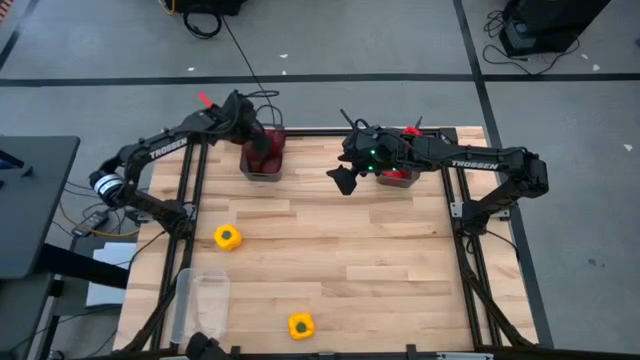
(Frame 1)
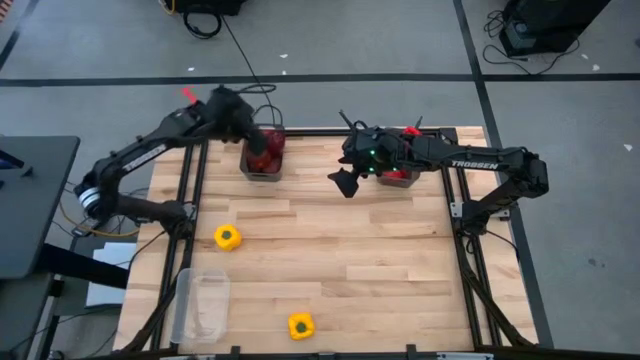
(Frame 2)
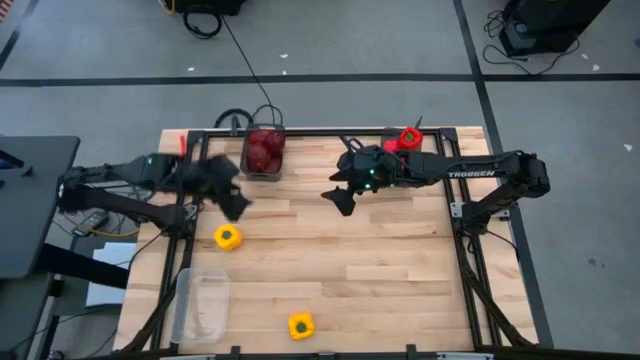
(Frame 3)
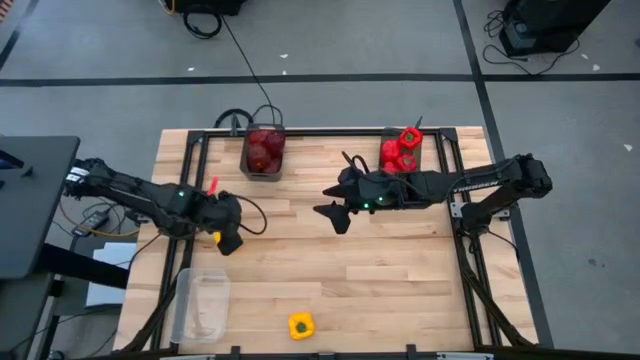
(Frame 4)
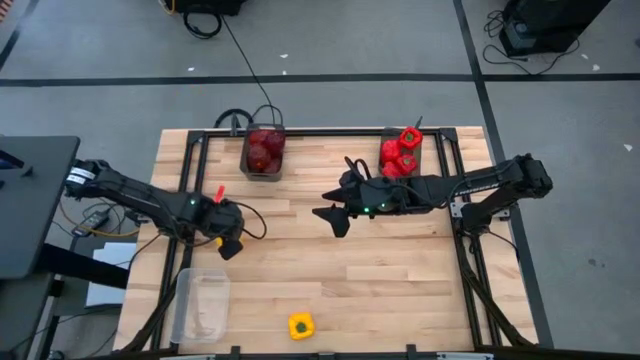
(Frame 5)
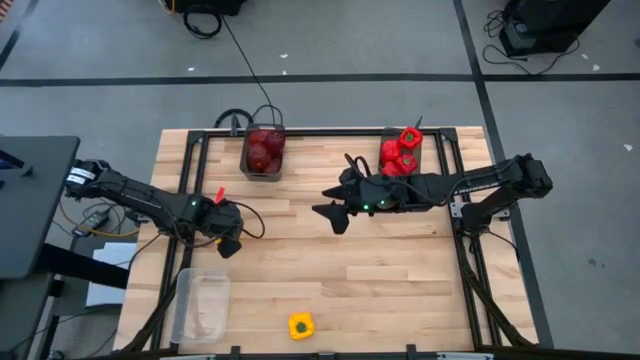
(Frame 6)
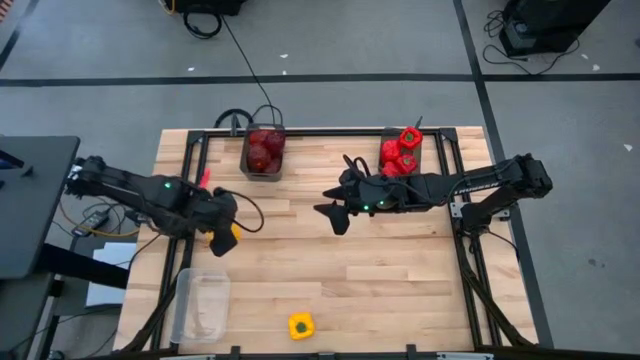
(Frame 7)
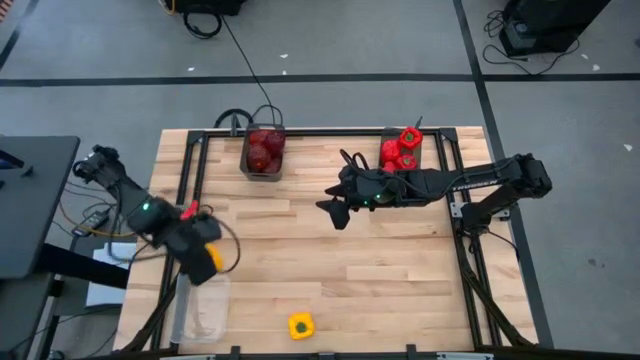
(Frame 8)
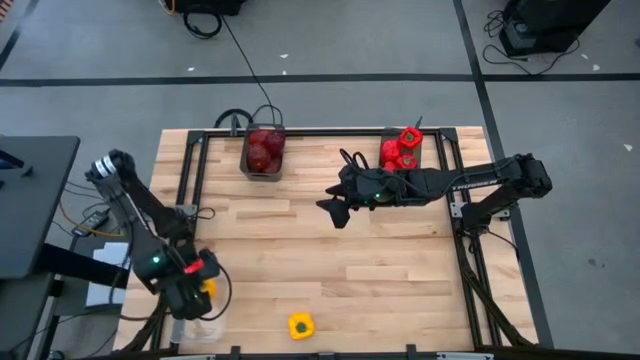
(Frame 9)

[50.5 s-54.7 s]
Task: Sort produce into baskets
Put the middle left yellow bell pepper into the transparent bin

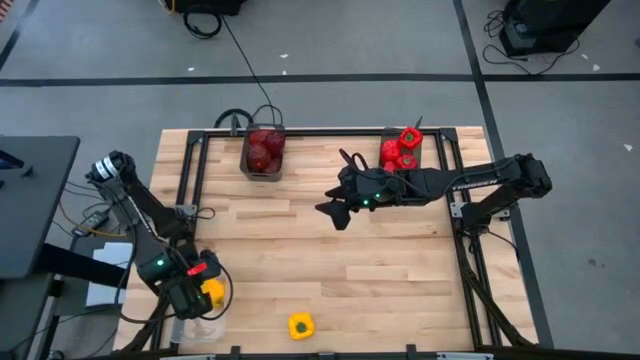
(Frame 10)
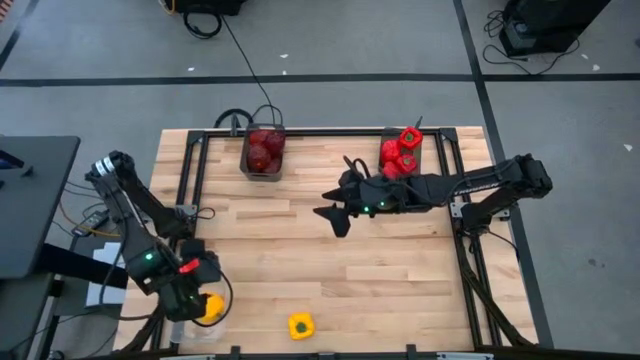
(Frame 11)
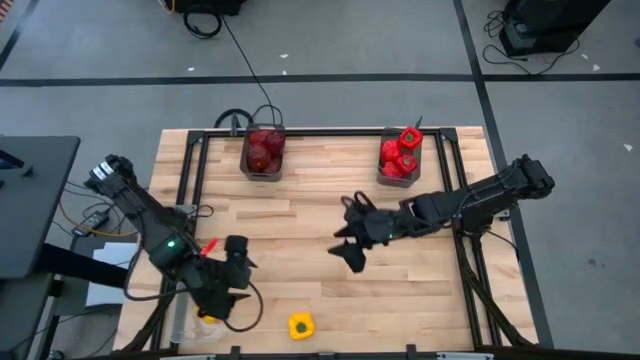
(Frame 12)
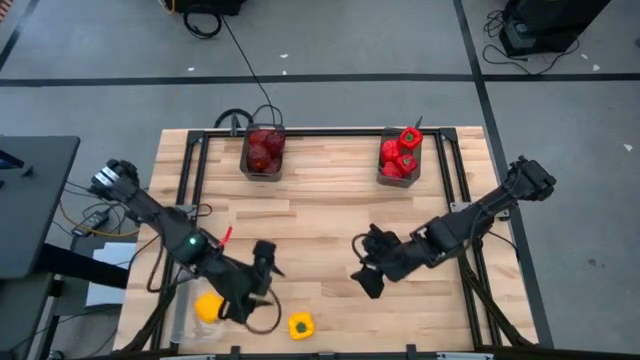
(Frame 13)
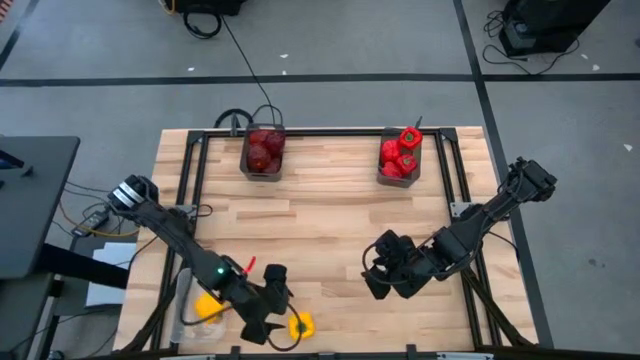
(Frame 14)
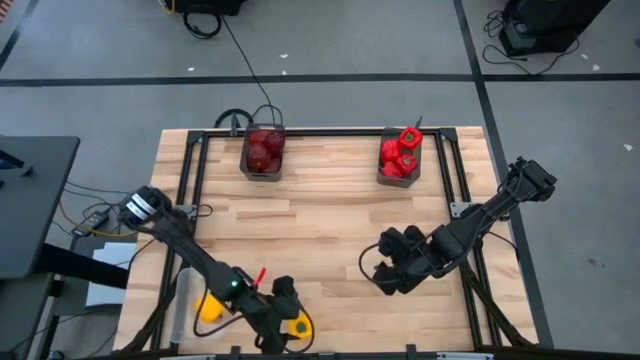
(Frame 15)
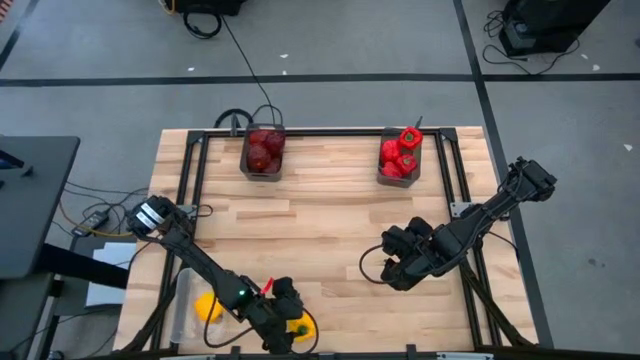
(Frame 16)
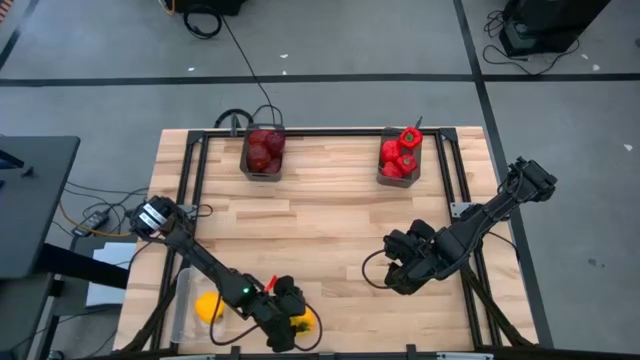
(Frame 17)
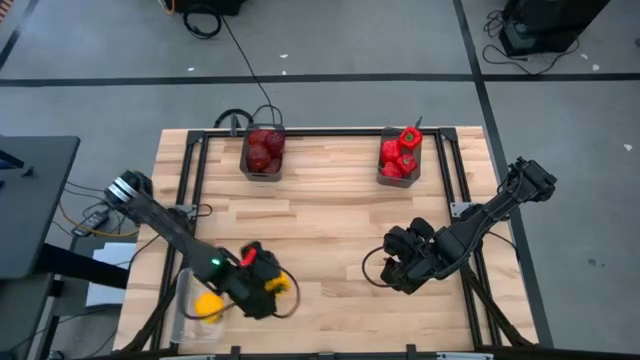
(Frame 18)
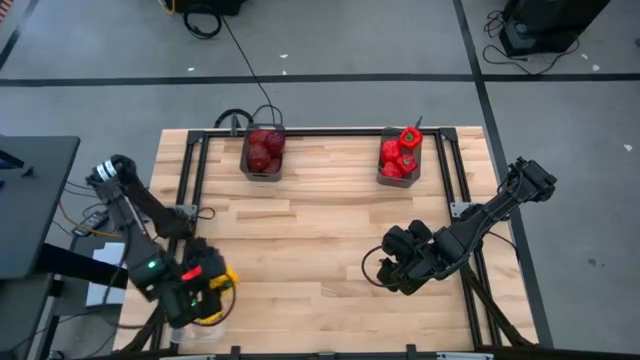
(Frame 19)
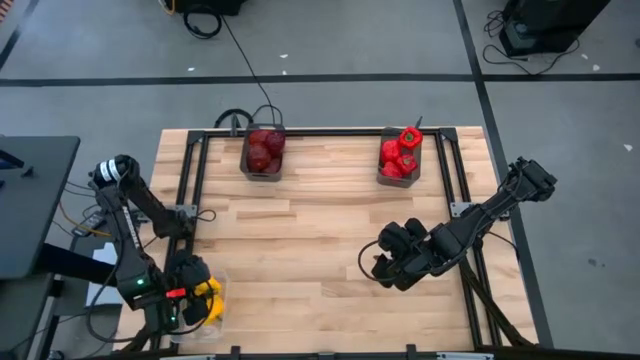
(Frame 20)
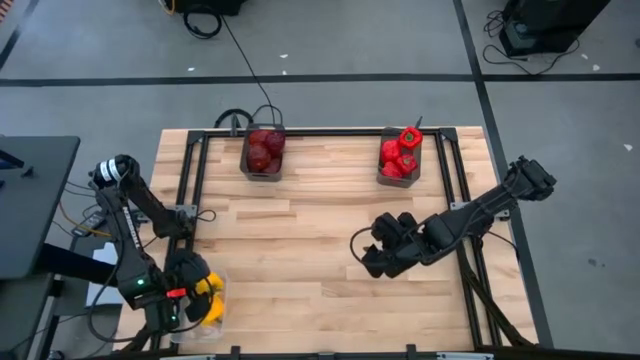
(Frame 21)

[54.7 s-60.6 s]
Put the yellow bell pepper into the transparent bin

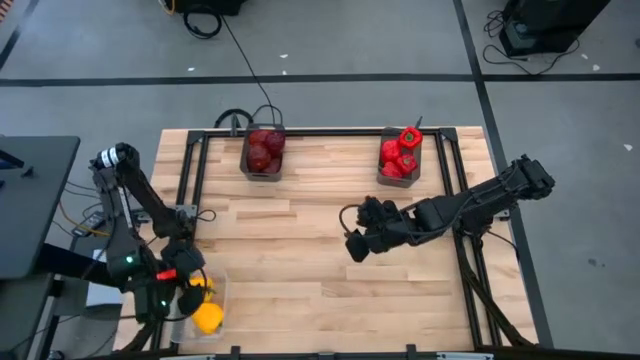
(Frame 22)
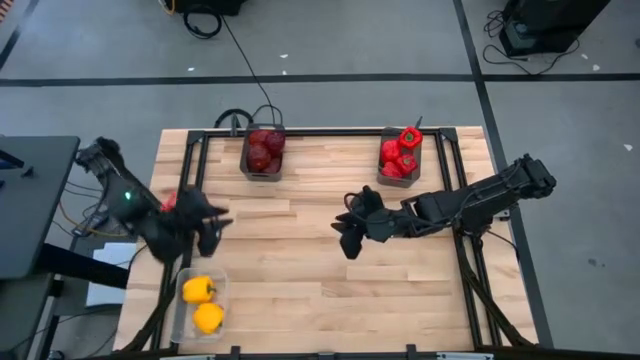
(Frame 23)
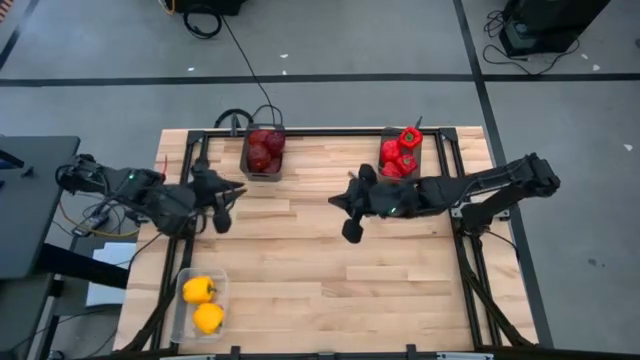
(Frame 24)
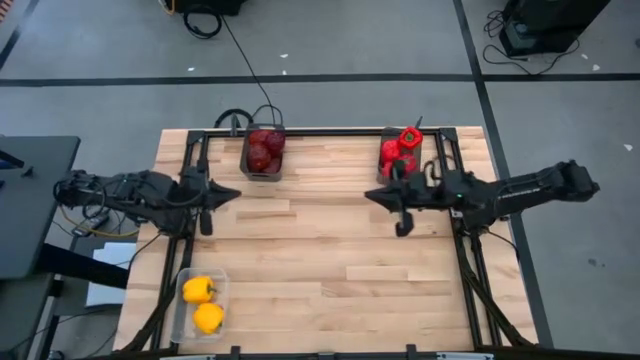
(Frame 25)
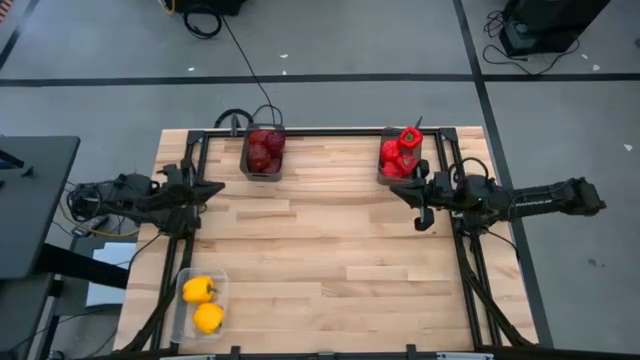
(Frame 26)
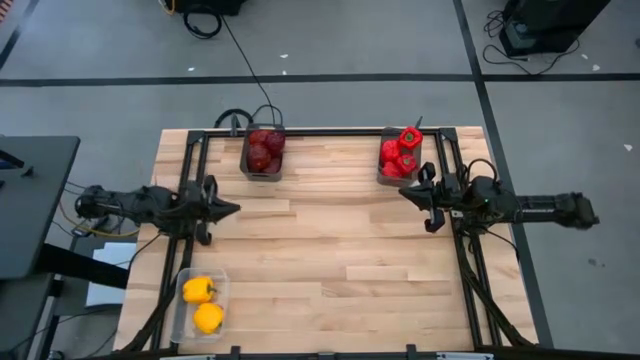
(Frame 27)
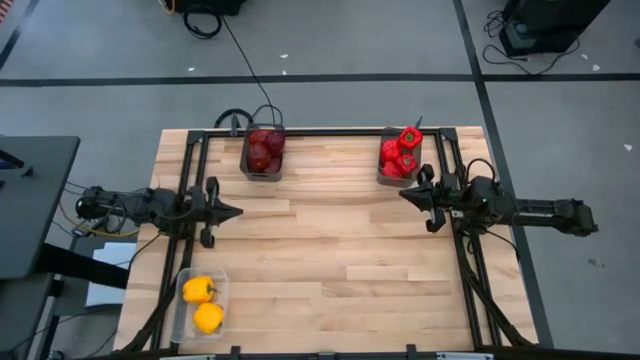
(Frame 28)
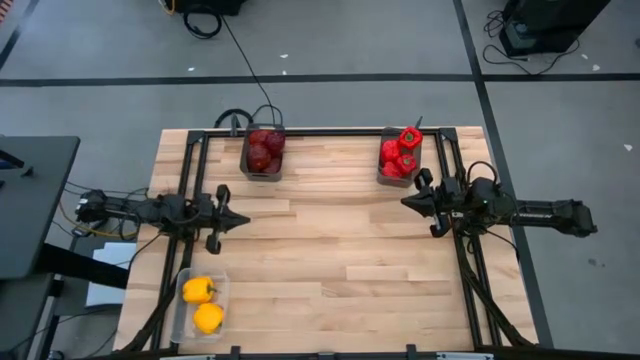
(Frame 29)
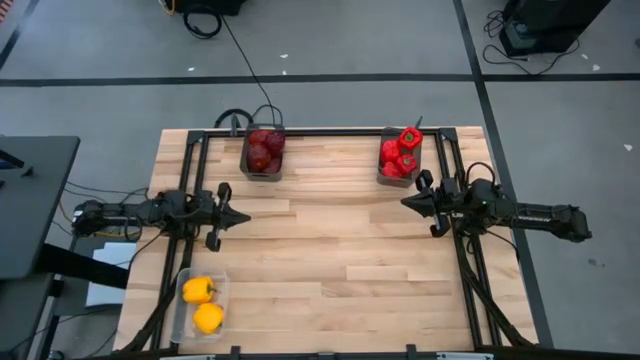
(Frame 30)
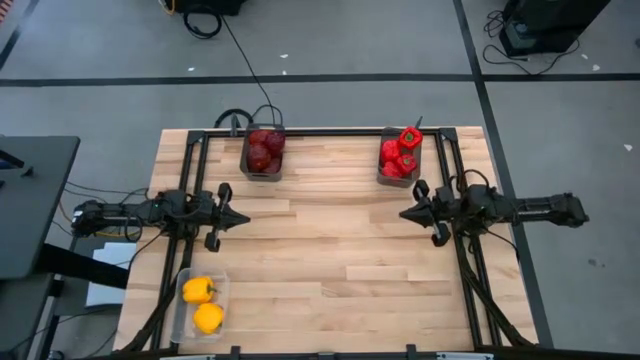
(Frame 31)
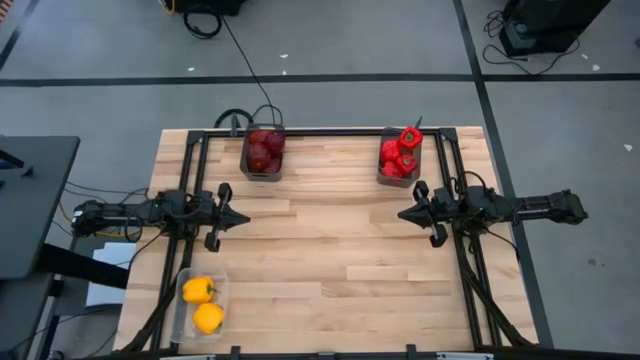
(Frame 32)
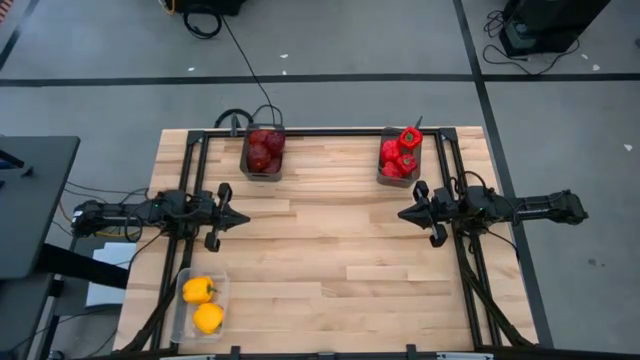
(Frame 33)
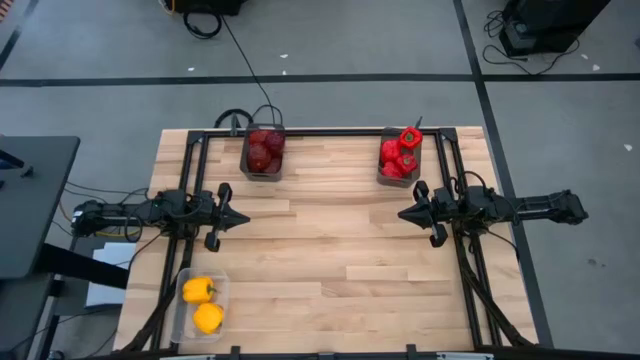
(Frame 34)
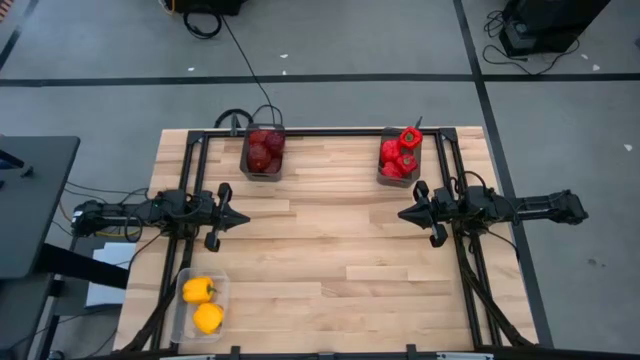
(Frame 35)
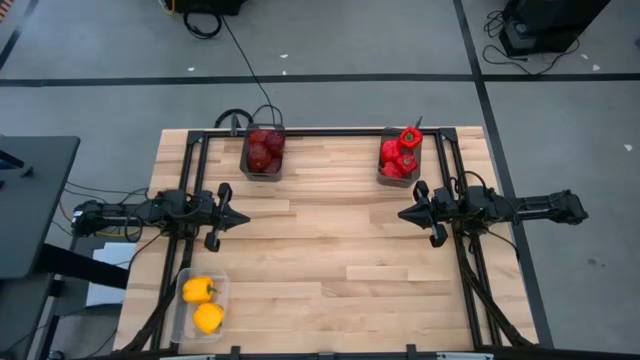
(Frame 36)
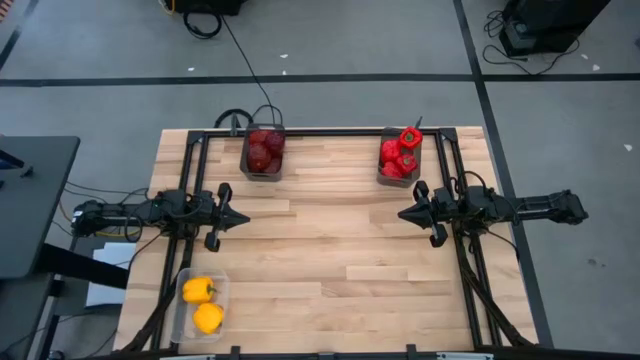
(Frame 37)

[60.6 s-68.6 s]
Return to Home Position

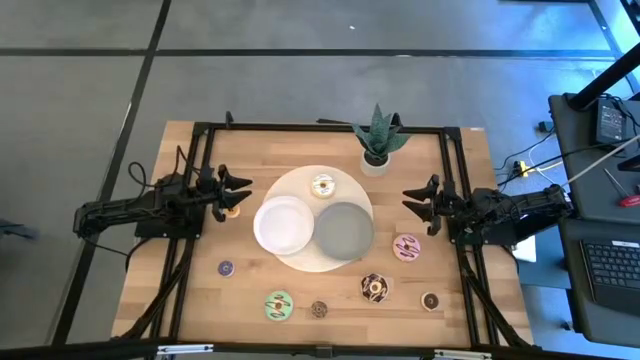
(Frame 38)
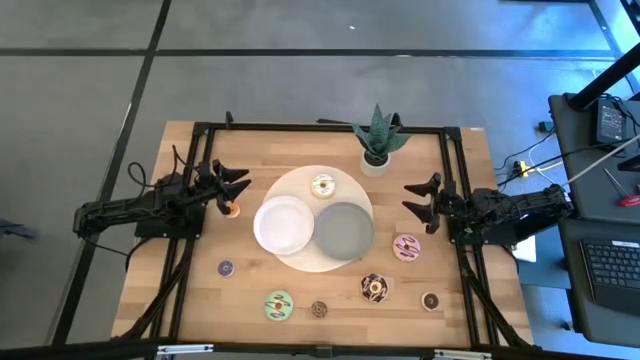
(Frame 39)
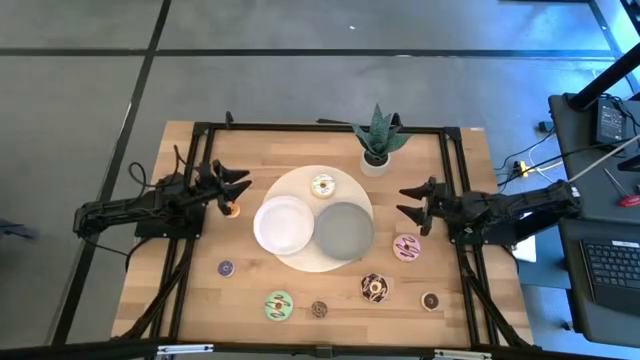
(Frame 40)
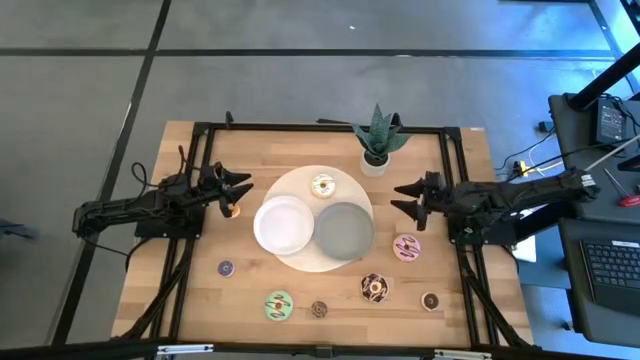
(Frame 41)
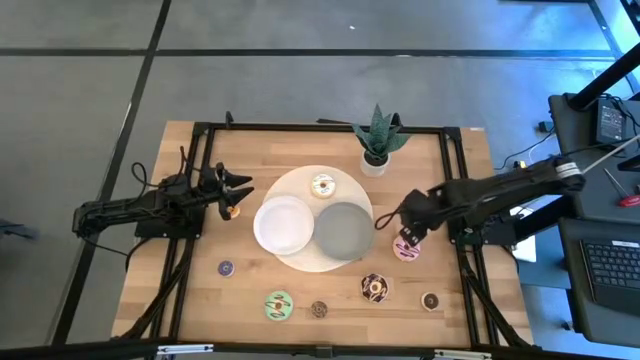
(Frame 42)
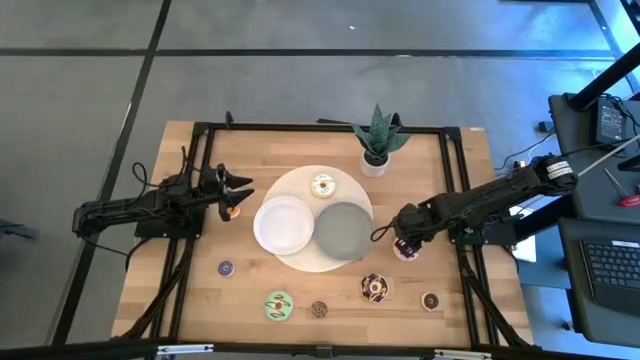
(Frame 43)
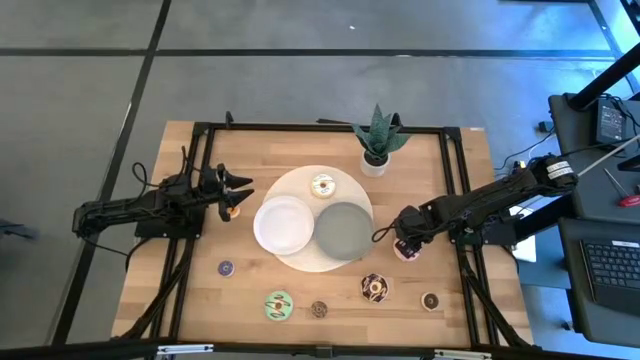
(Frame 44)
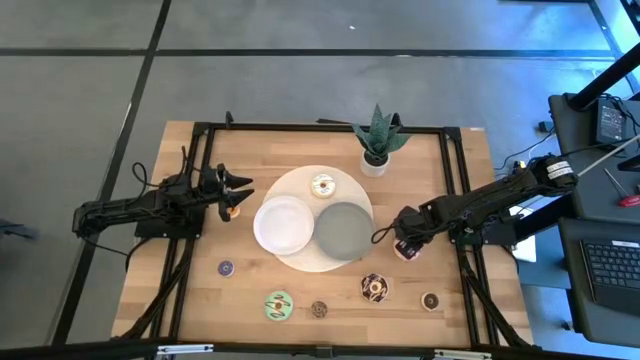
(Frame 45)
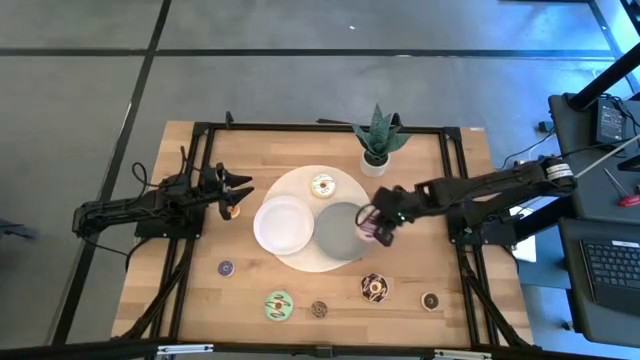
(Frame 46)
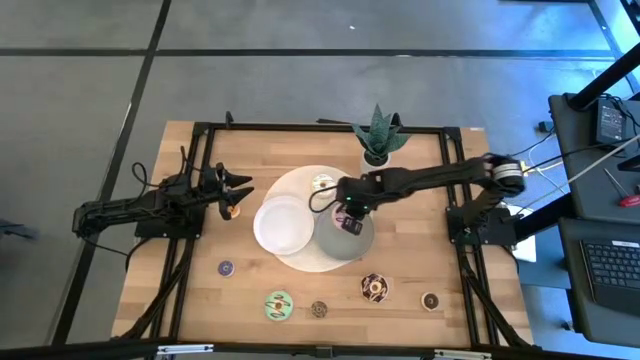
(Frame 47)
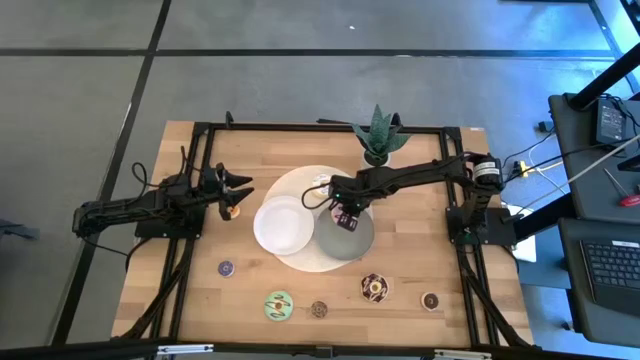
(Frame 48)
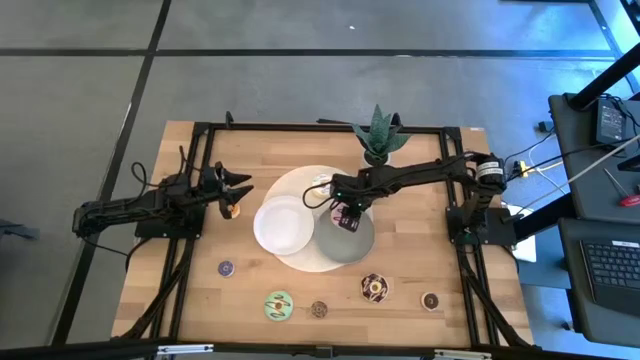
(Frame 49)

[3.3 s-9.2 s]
Task: Pick & Place donuts
Put the large pink donut on the gray plate
